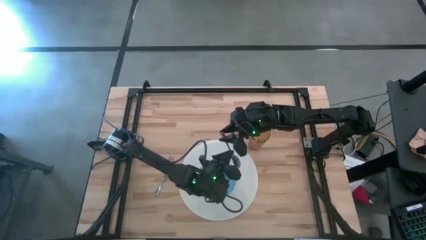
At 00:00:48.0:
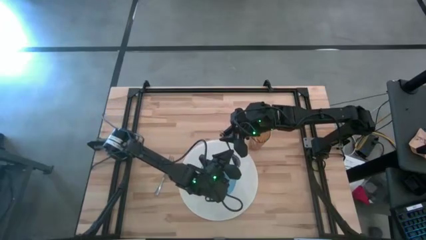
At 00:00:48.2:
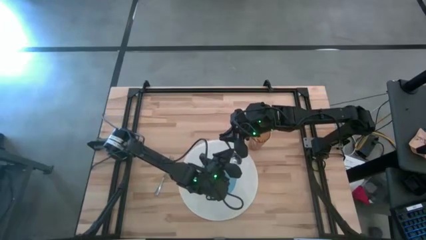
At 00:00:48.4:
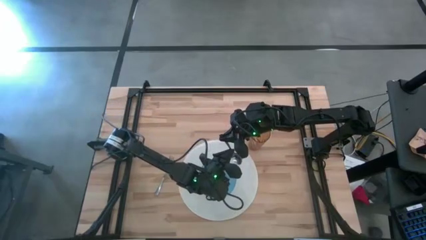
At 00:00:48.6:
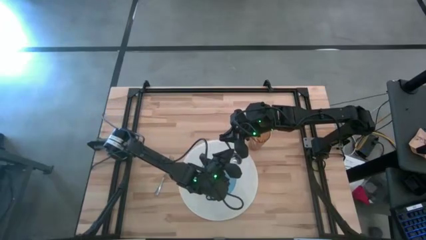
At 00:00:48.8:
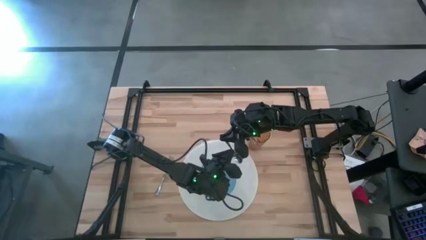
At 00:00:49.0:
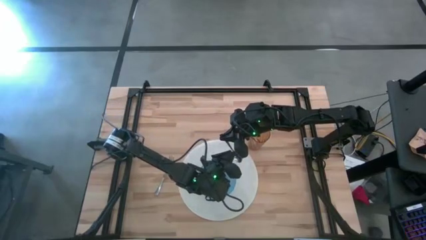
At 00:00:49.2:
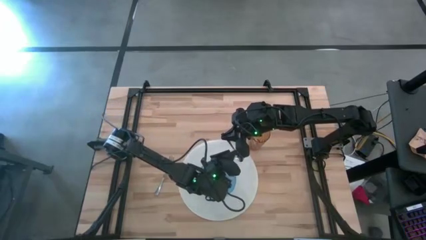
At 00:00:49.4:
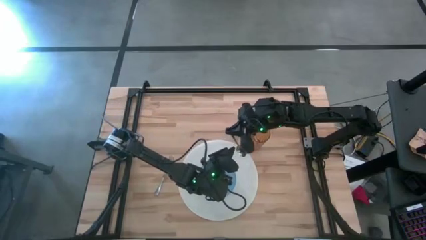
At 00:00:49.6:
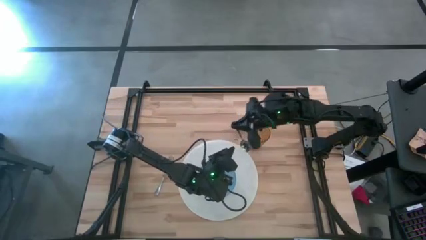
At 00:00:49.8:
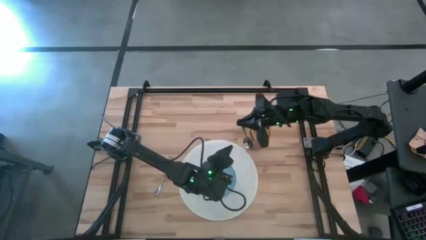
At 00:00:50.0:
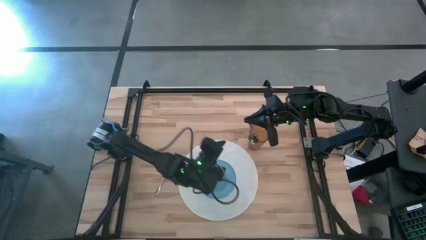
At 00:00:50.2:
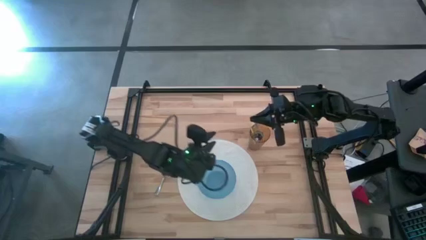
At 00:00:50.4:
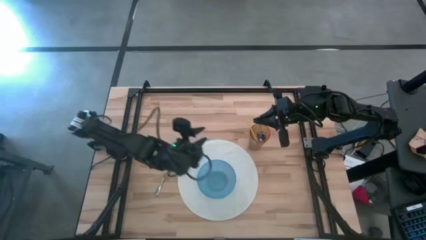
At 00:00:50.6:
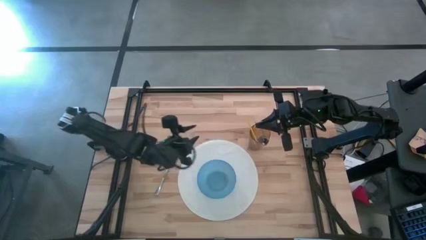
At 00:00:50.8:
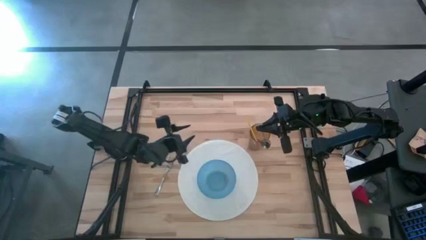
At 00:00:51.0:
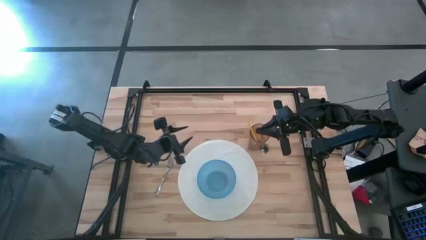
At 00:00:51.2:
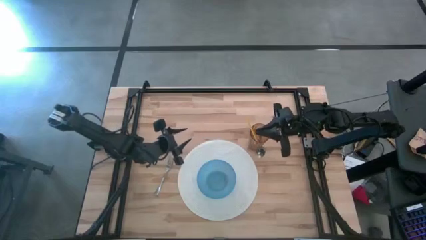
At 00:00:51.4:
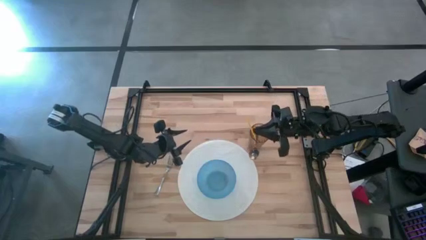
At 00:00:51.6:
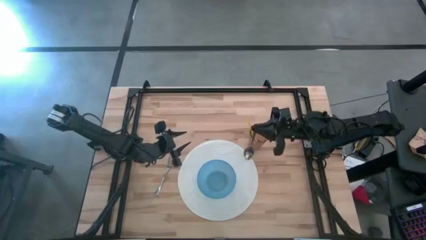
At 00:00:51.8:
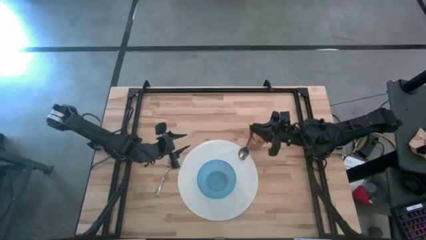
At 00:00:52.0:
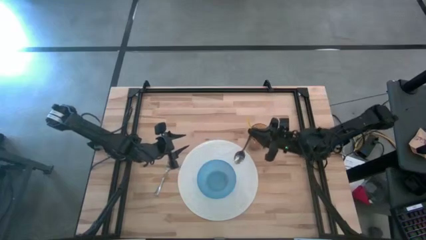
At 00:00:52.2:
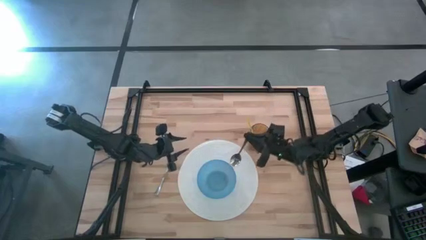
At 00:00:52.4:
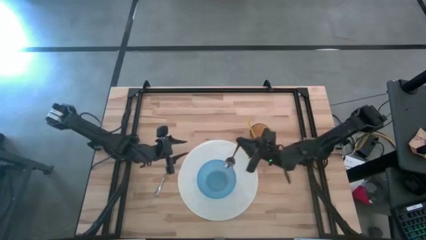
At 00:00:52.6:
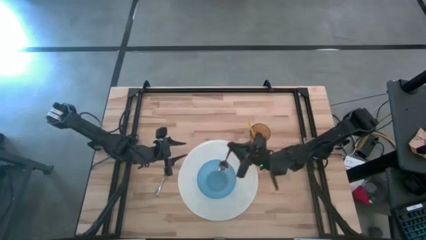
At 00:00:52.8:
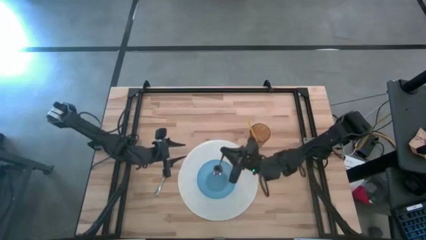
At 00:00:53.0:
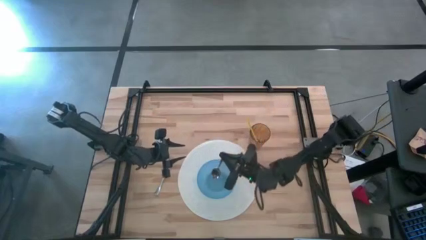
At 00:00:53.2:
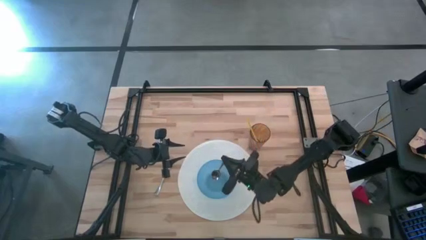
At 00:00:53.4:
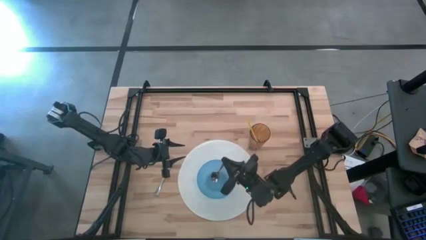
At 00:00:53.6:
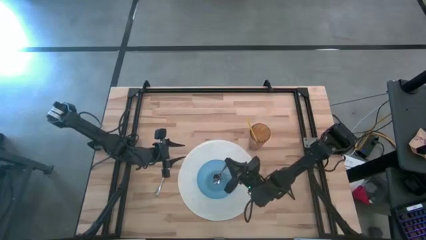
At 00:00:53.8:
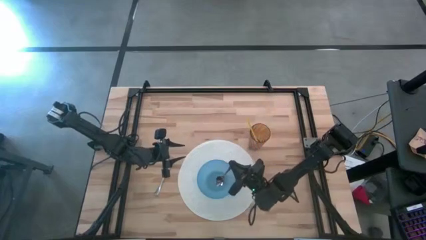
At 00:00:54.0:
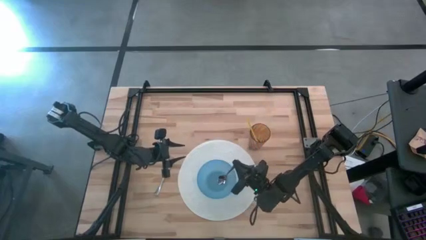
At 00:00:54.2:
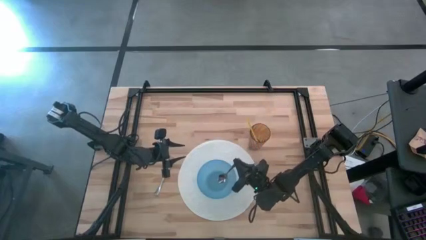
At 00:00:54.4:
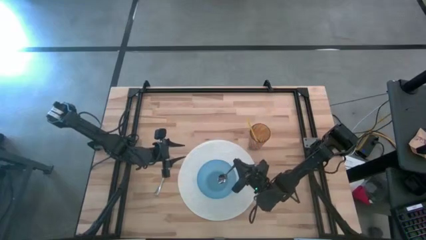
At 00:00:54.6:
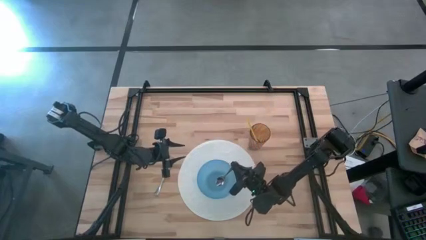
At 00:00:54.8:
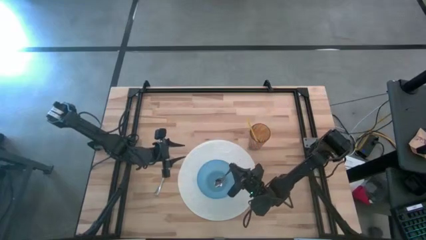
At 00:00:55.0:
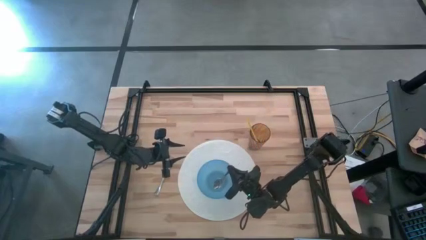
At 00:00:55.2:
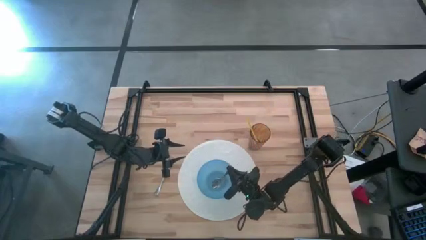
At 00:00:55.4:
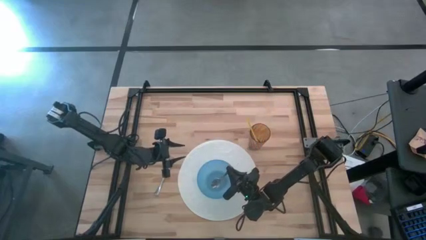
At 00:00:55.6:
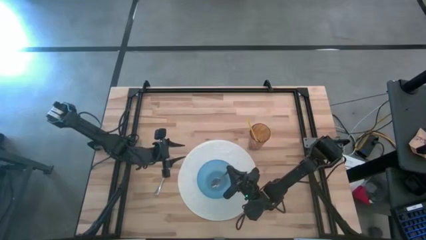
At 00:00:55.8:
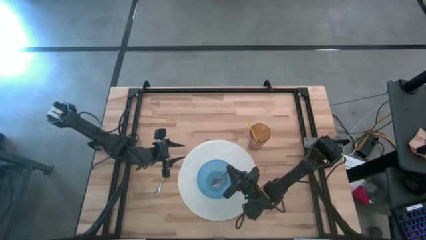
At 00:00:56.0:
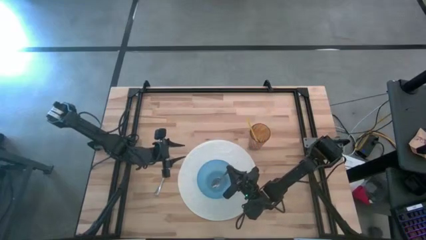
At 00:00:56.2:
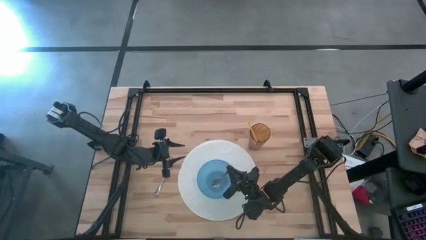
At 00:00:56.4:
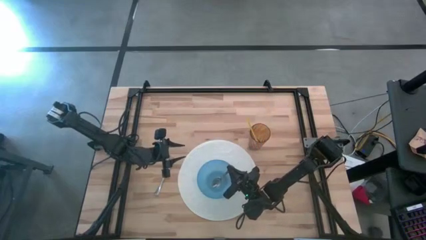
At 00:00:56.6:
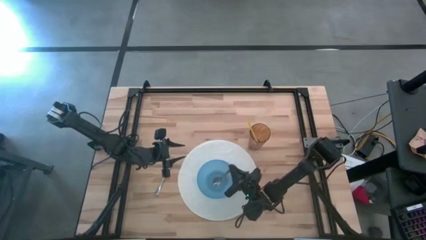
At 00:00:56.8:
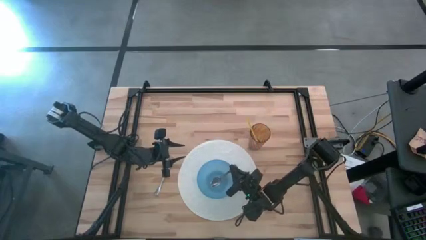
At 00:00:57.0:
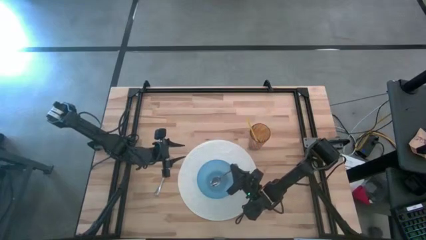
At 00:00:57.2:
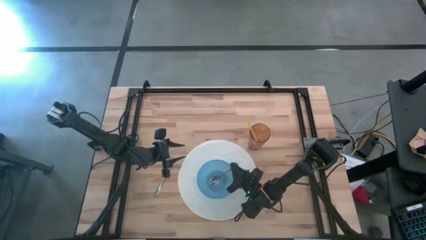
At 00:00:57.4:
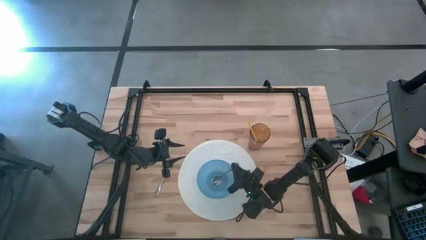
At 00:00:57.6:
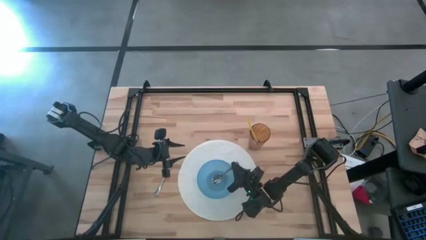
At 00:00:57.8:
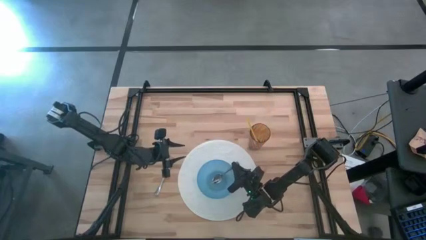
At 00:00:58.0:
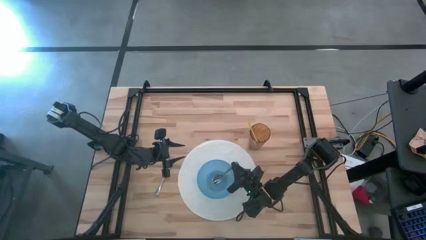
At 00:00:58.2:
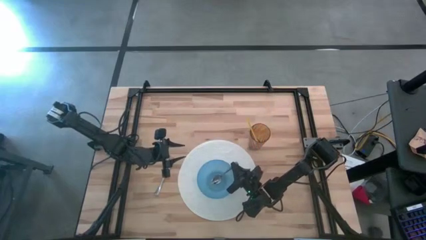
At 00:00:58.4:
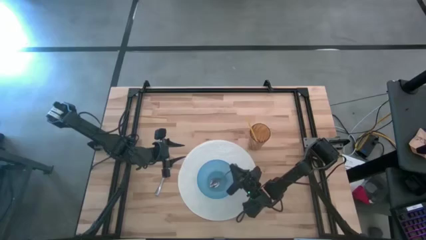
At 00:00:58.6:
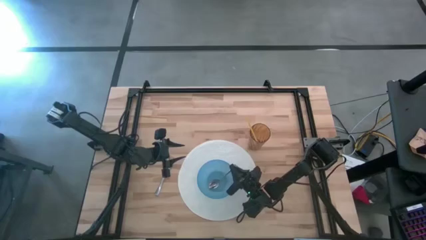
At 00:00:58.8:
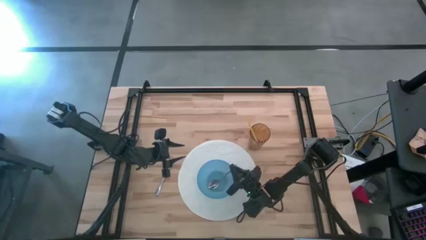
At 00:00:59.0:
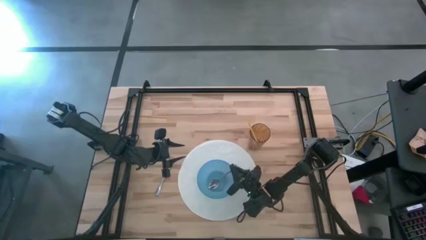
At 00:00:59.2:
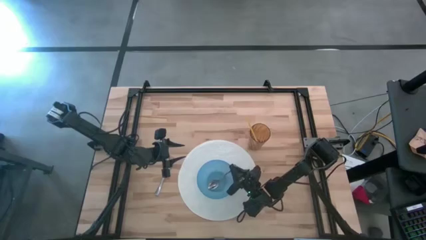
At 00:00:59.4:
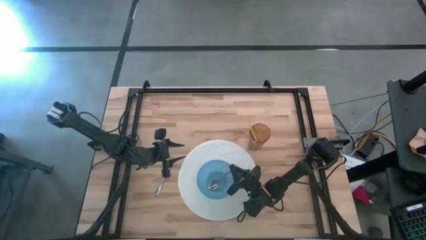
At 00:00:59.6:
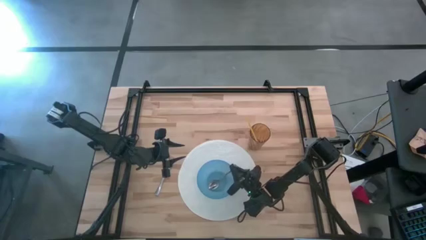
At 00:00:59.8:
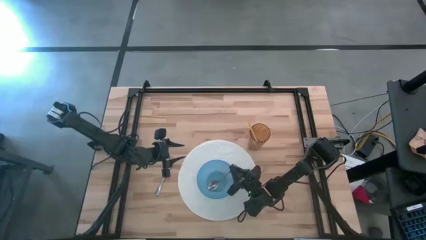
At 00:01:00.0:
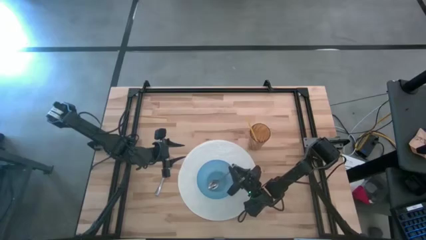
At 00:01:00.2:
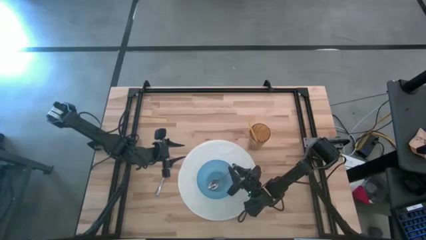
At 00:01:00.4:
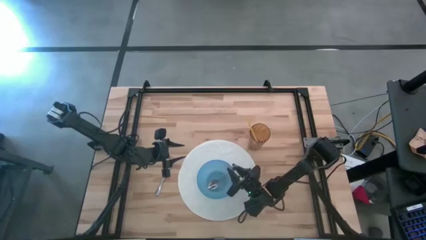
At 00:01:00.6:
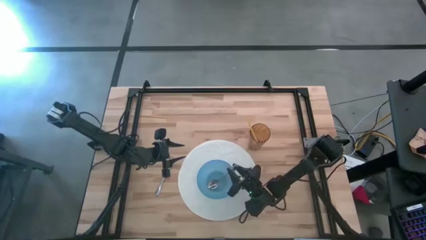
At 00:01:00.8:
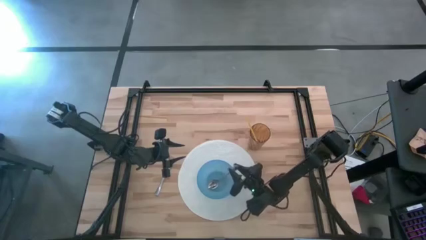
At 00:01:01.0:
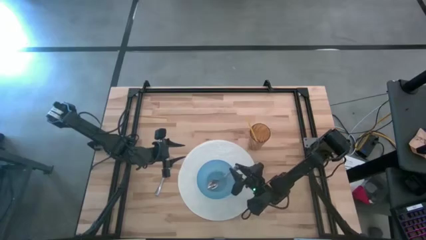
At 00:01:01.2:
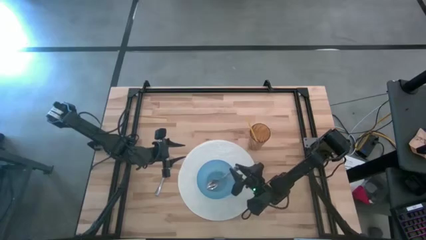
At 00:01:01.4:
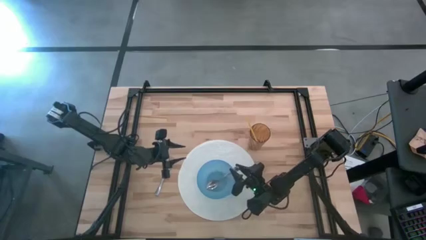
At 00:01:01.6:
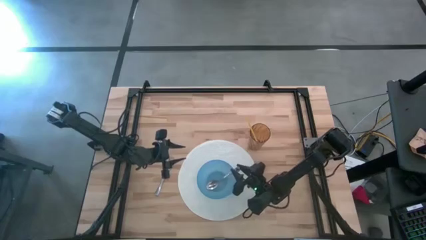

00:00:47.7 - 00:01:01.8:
Task: Pick & Place Utensil
Put the silver spoon into the blue bowl on the white mat
